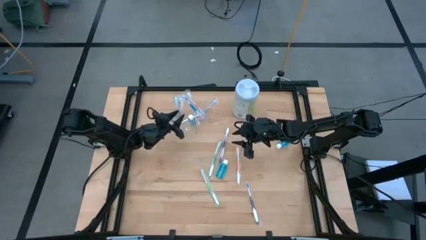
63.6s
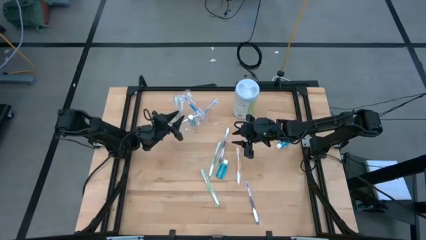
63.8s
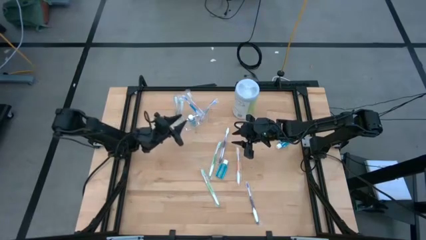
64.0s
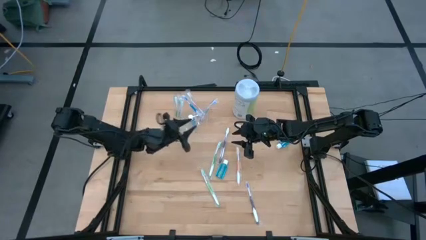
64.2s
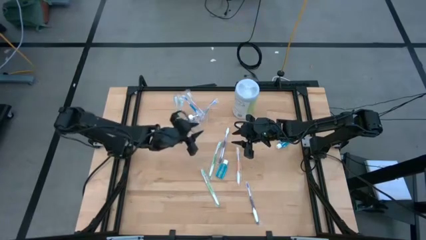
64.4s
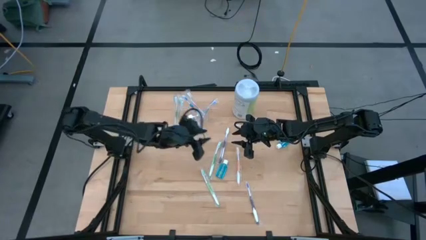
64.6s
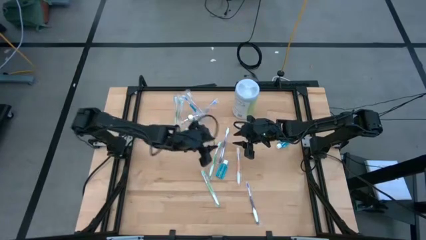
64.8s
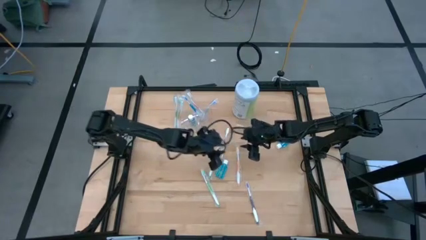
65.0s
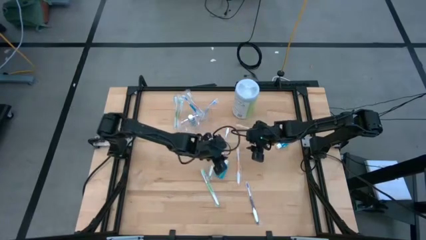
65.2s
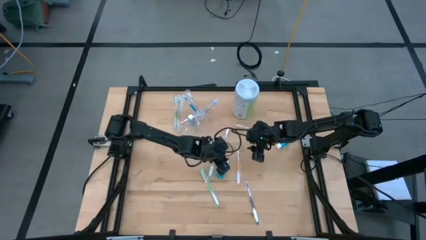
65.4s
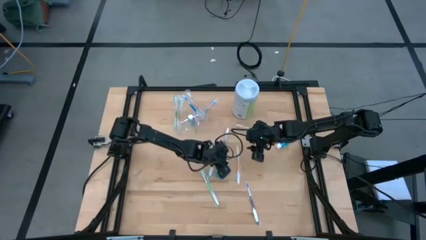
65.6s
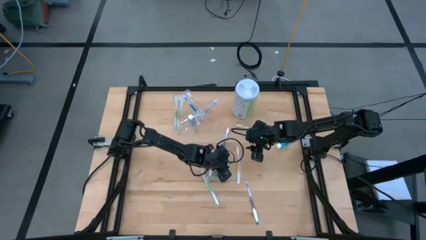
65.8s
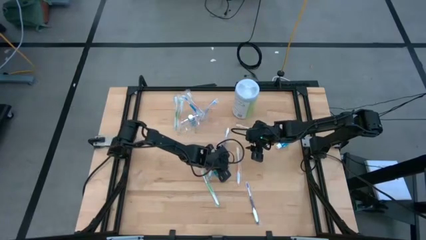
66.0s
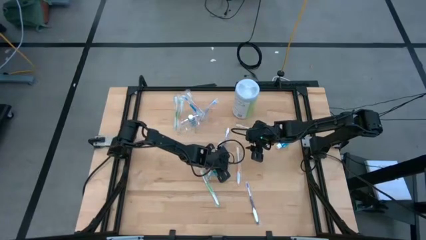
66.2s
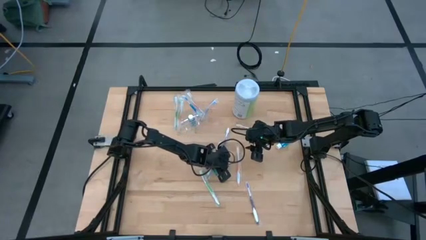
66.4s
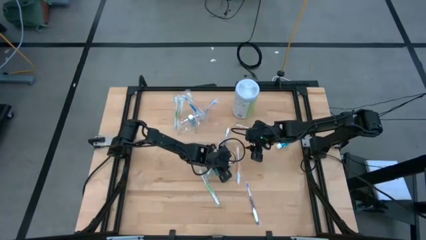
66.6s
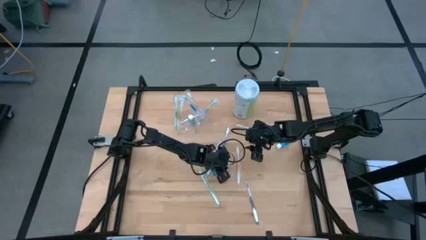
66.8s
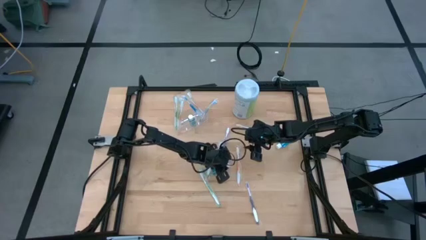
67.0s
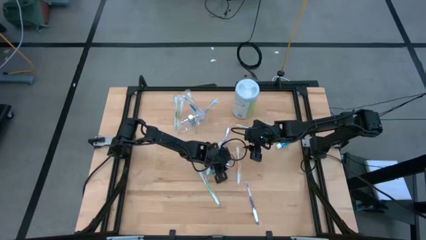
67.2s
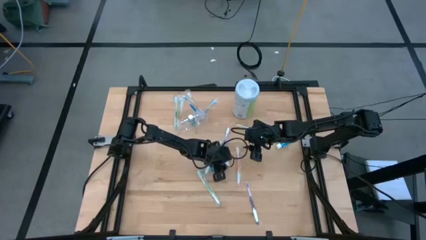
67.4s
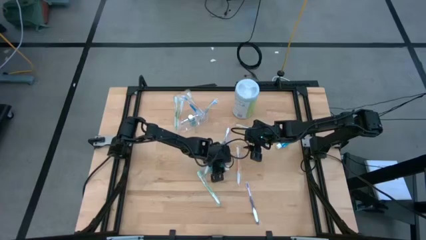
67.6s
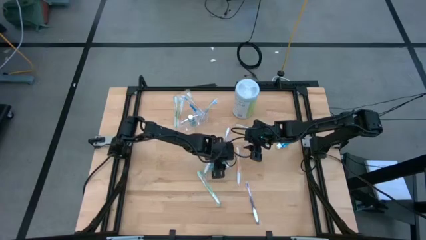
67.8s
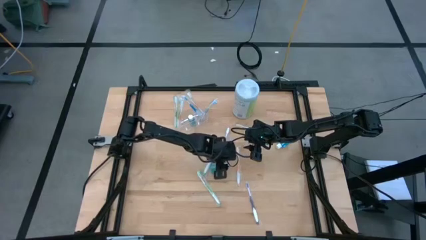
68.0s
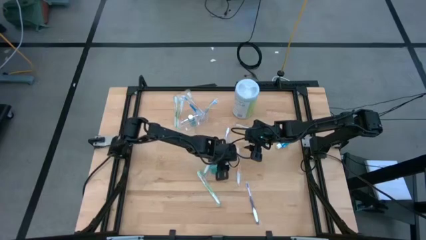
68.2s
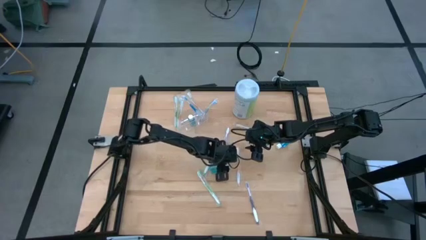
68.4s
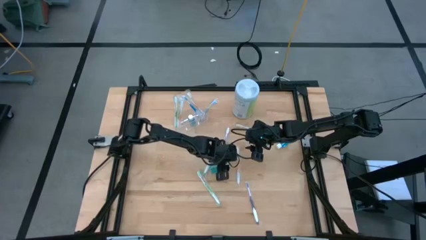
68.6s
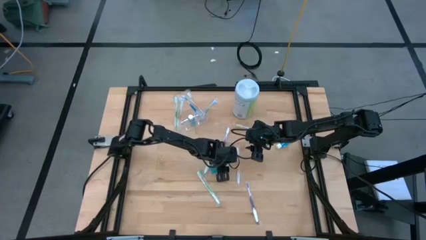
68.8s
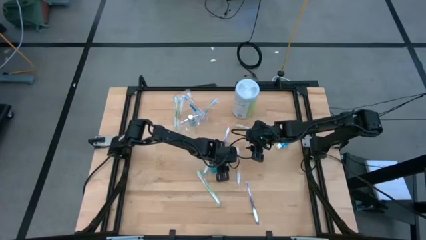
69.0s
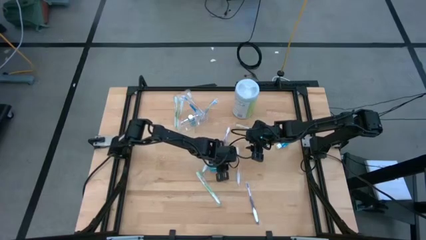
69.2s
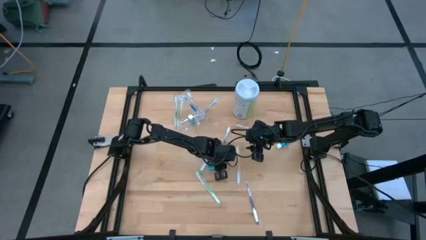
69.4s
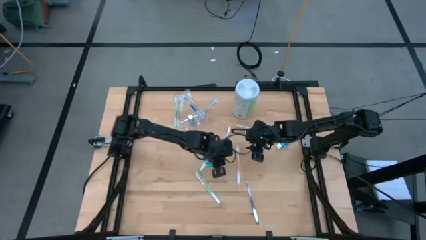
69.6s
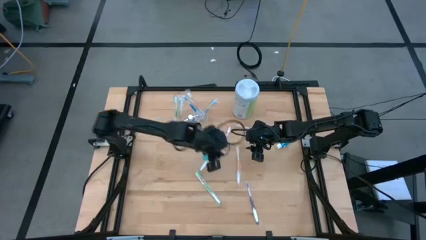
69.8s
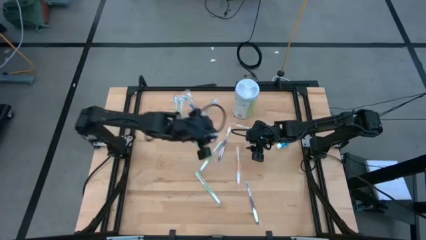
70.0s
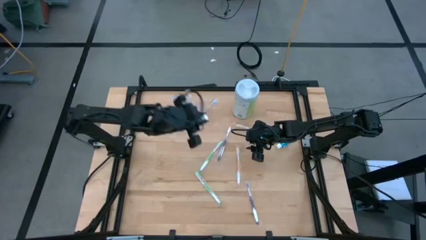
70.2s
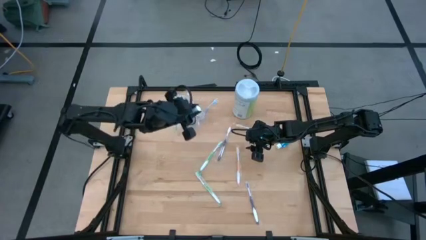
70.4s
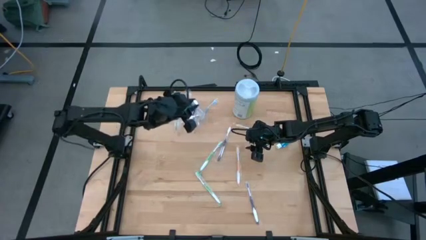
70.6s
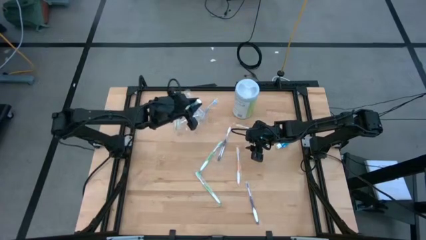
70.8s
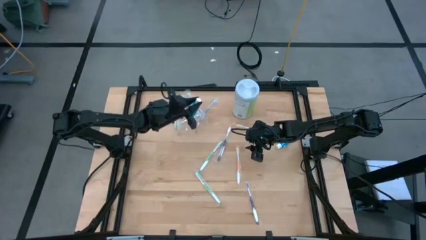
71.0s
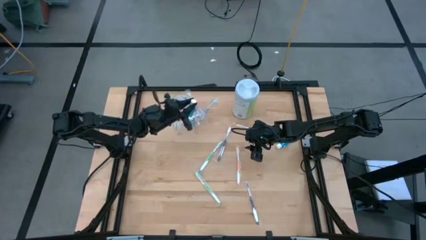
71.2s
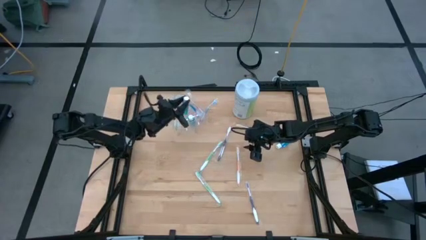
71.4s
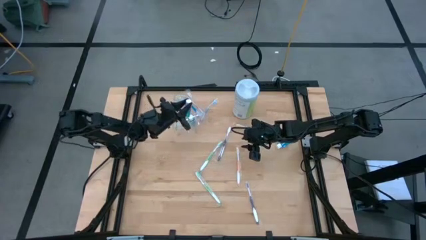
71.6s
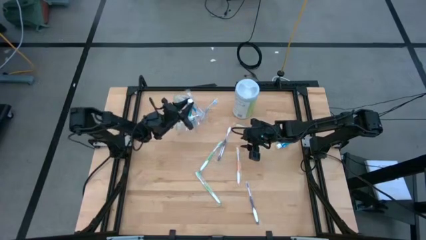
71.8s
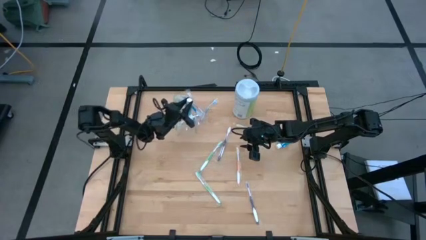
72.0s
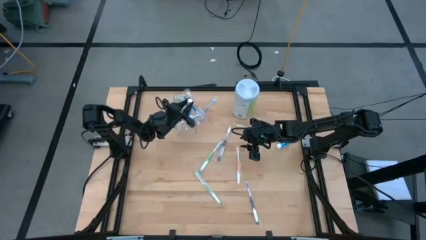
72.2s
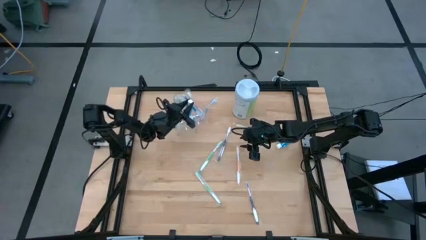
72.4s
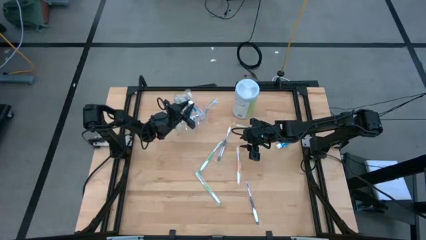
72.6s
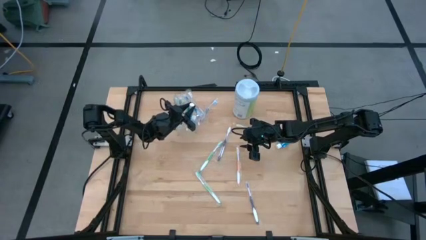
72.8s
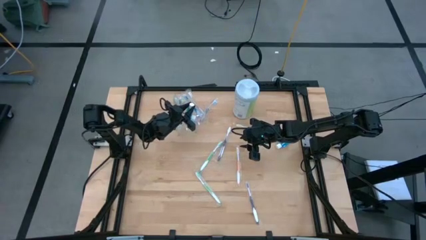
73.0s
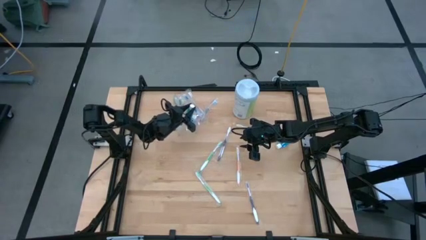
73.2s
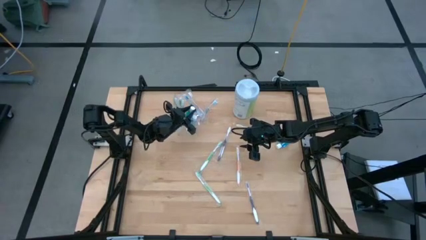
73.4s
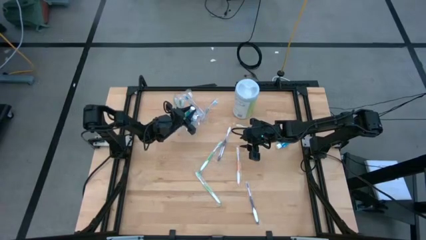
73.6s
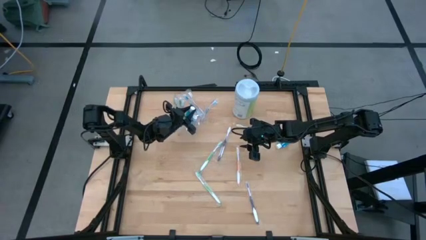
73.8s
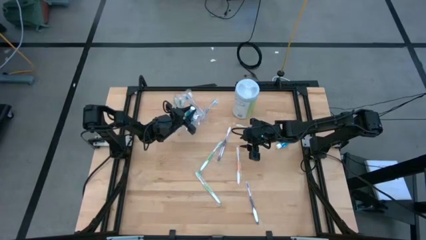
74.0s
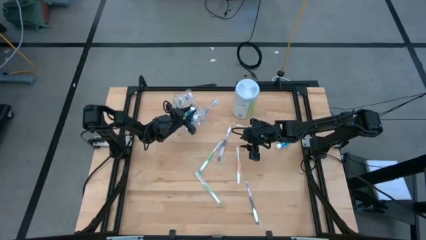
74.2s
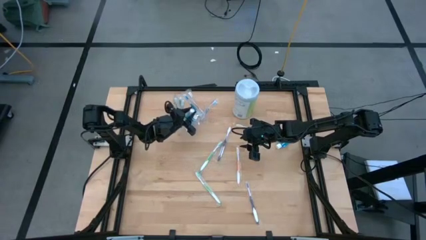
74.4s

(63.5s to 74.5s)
Task: Pick & Place toothbrushing station
Put the mouthwash into the transparent organizer

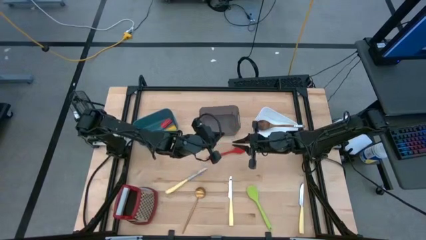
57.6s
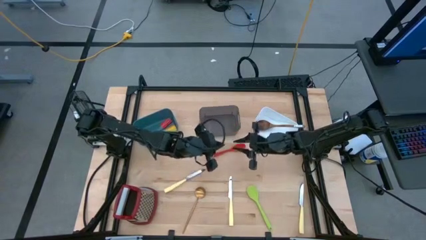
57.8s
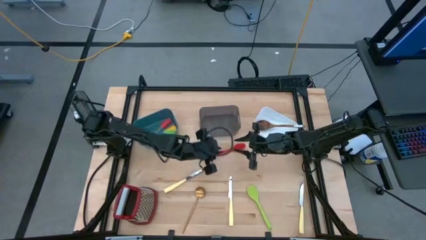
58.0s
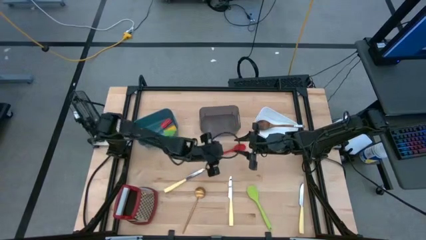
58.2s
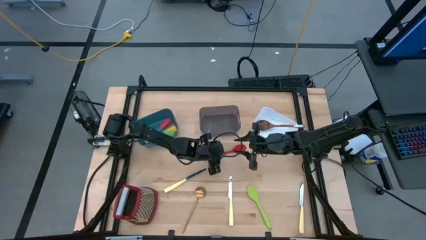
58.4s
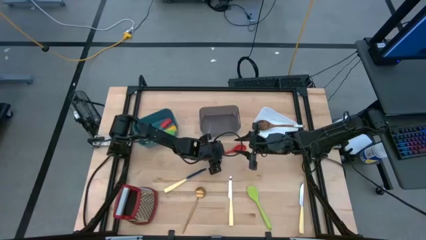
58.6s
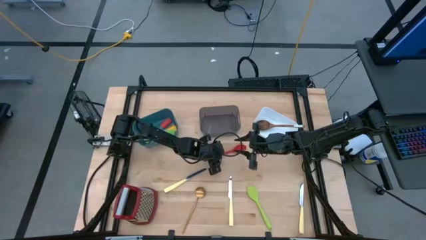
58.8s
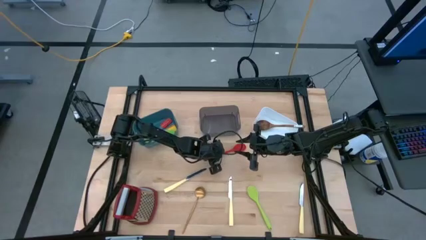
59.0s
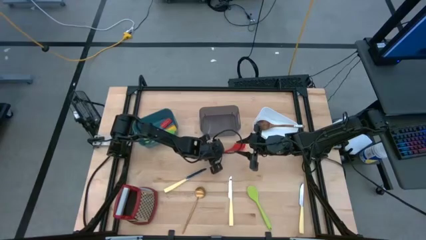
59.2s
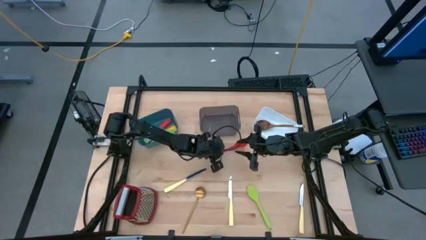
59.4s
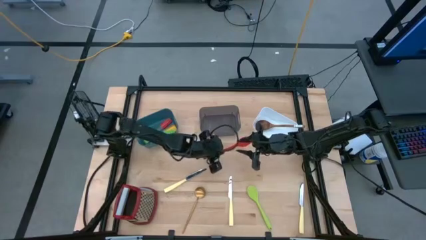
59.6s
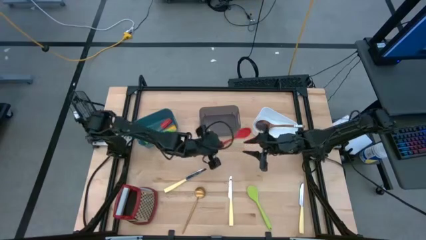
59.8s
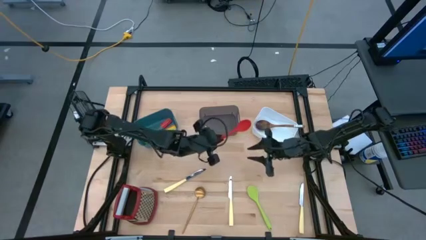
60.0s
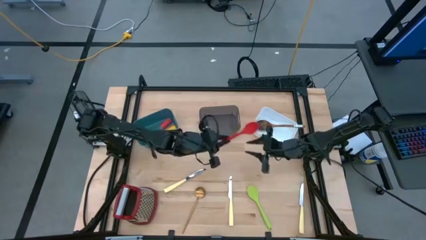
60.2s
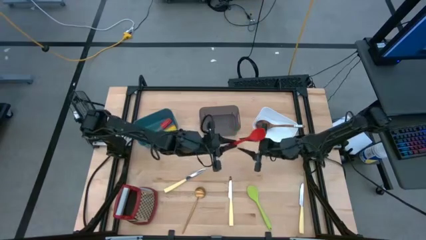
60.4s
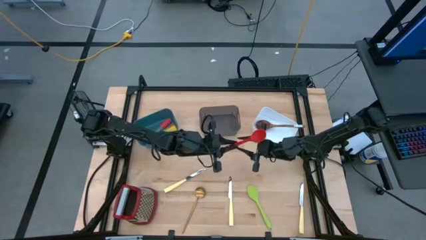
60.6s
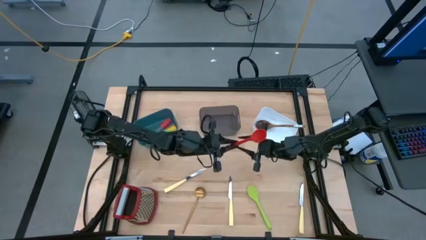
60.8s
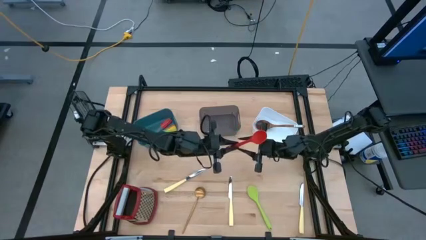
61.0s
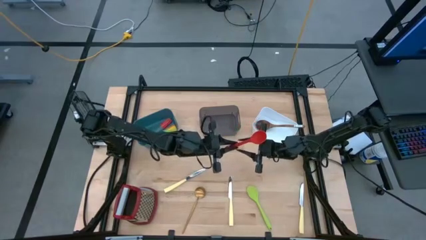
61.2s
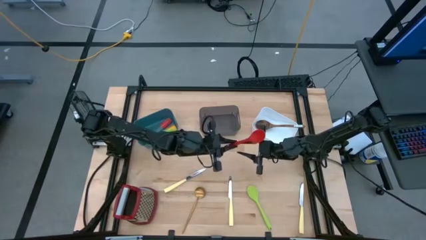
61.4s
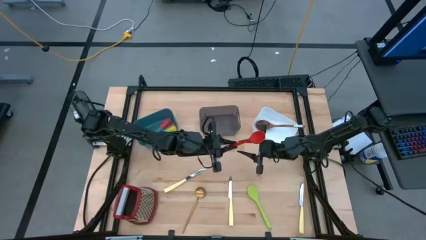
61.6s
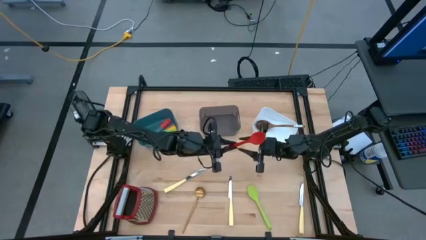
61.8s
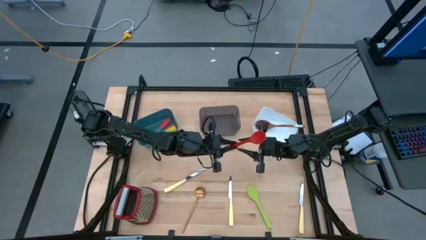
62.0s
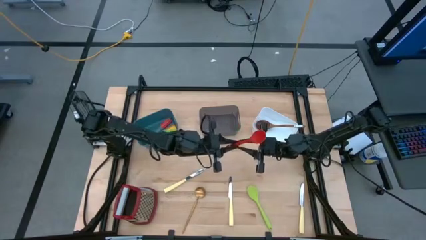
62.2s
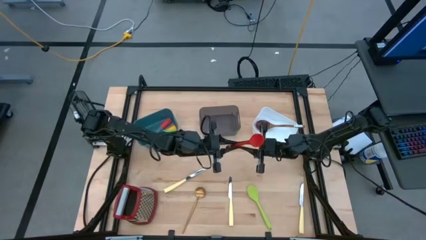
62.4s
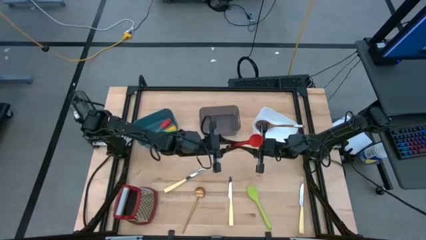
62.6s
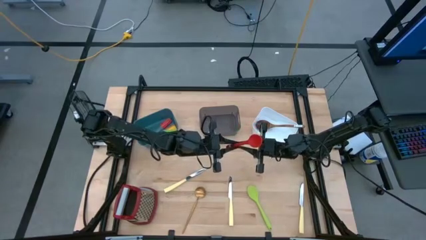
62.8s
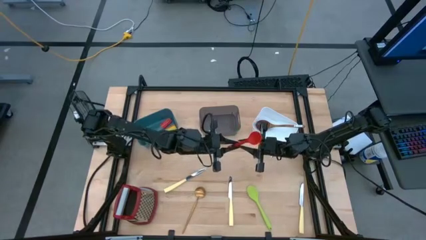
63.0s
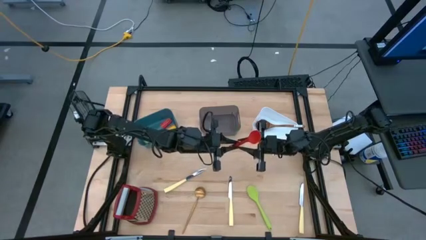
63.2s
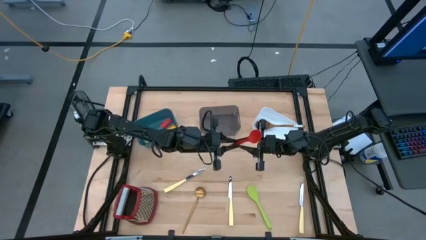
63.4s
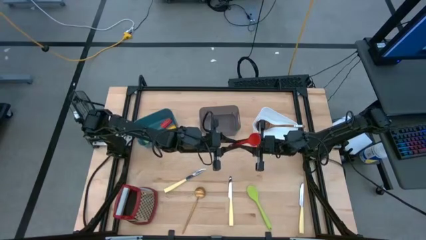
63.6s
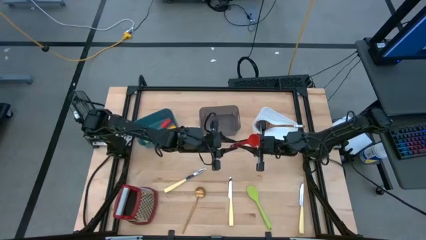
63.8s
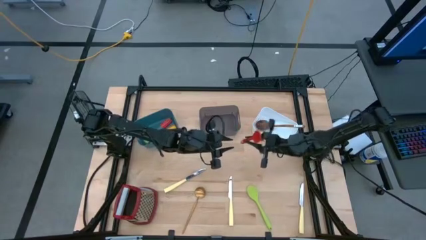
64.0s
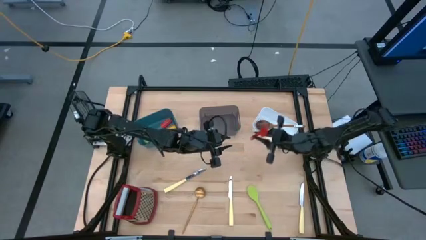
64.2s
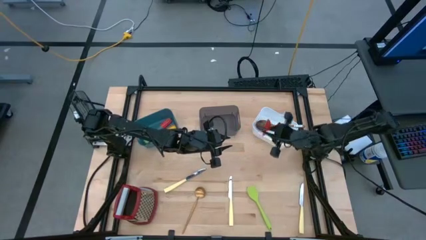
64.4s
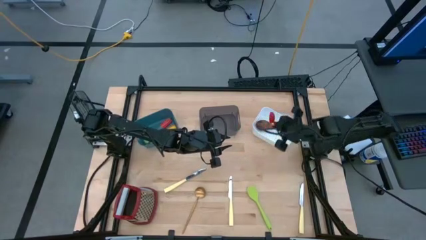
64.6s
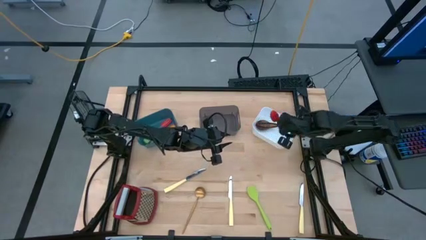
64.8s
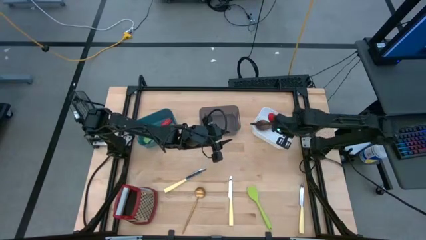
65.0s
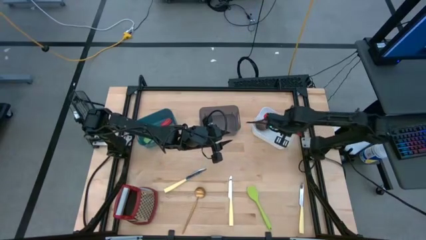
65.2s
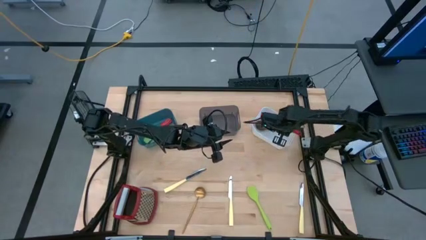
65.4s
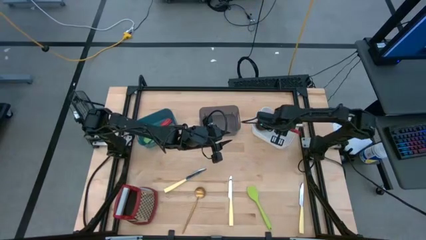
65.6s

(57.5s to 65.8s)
Task: Pick & Place Kitchen Items
Put the red serving spoon into the white bin
